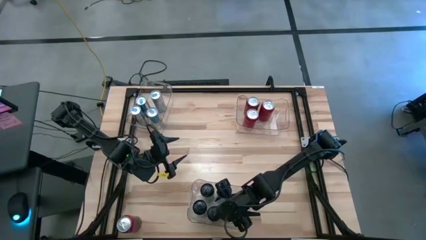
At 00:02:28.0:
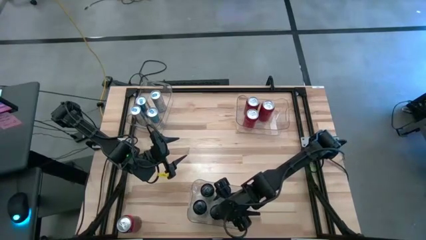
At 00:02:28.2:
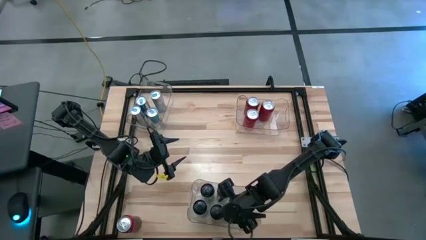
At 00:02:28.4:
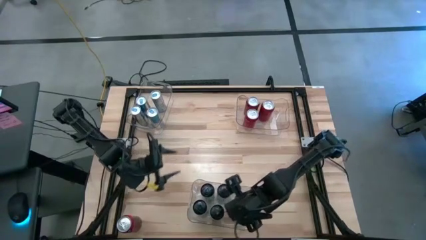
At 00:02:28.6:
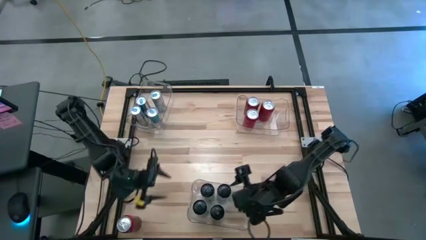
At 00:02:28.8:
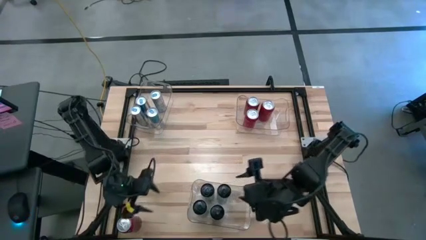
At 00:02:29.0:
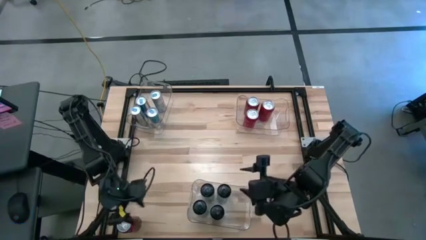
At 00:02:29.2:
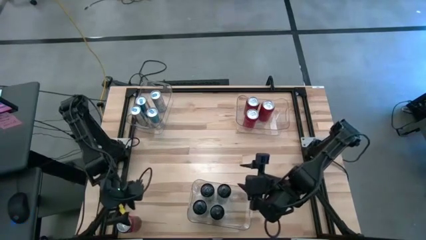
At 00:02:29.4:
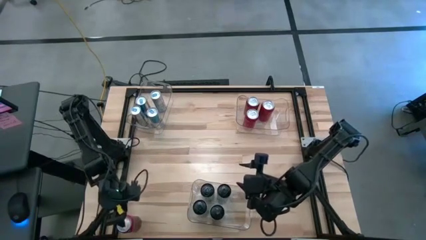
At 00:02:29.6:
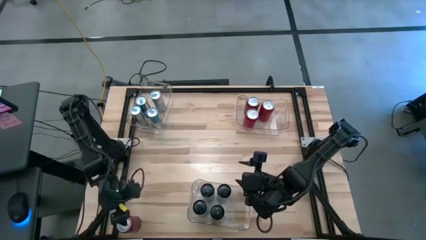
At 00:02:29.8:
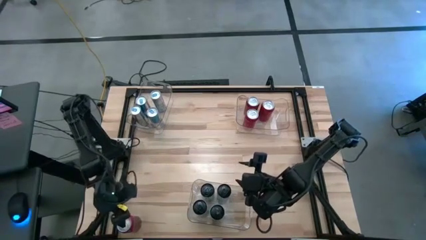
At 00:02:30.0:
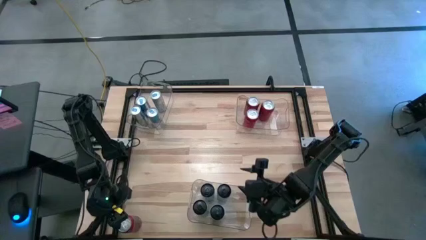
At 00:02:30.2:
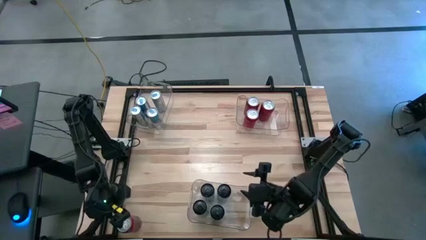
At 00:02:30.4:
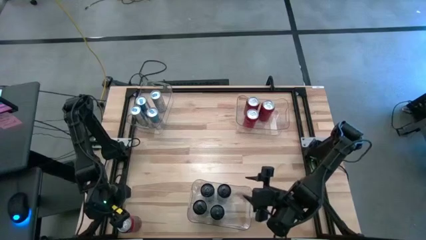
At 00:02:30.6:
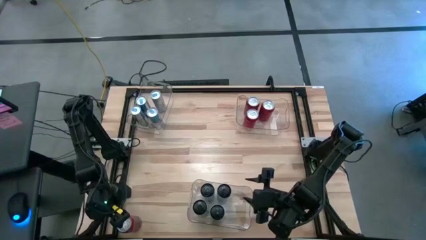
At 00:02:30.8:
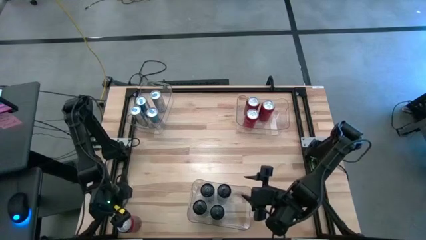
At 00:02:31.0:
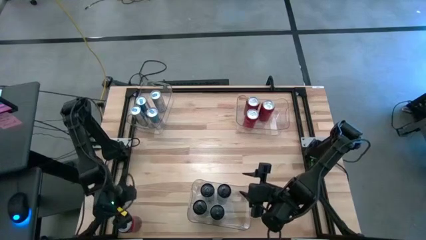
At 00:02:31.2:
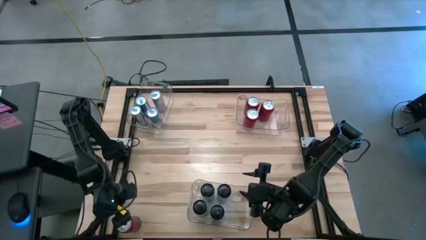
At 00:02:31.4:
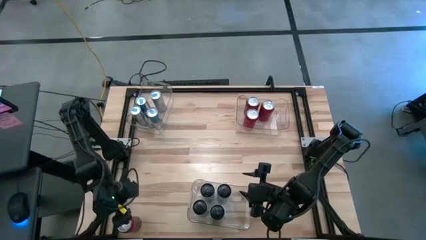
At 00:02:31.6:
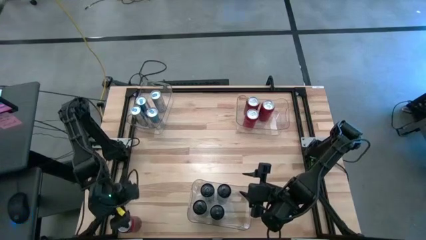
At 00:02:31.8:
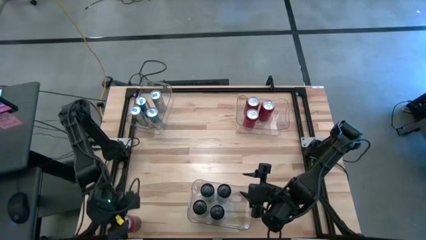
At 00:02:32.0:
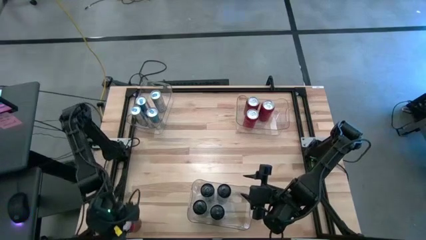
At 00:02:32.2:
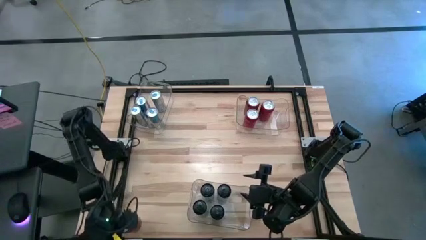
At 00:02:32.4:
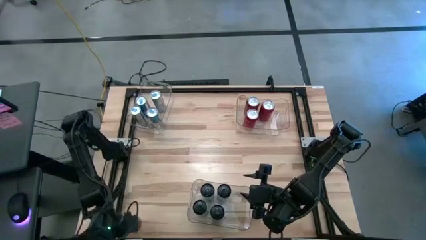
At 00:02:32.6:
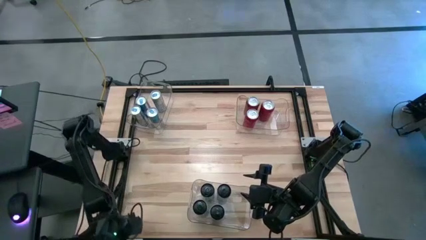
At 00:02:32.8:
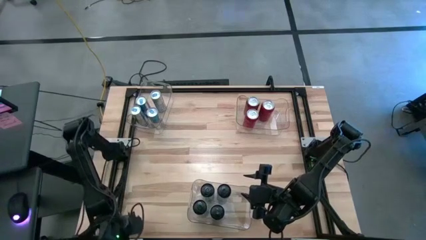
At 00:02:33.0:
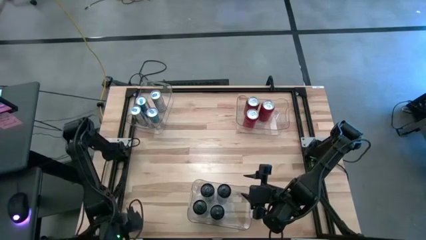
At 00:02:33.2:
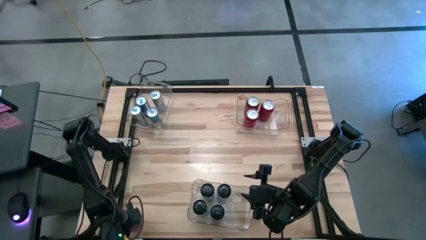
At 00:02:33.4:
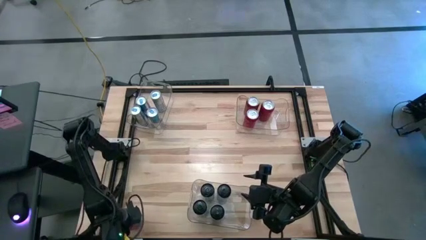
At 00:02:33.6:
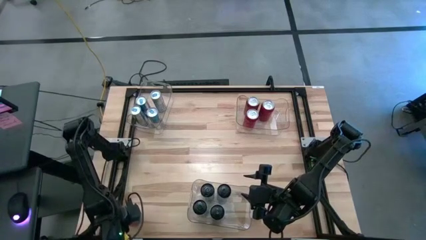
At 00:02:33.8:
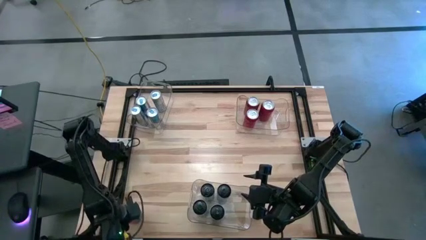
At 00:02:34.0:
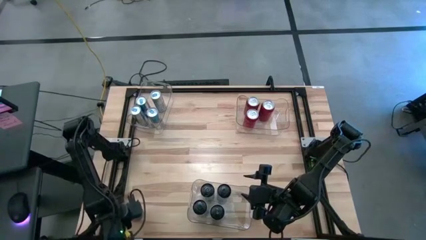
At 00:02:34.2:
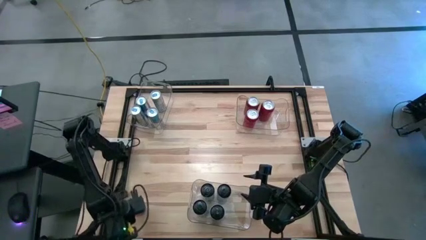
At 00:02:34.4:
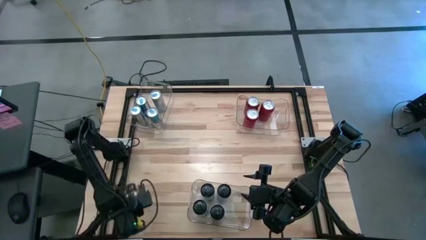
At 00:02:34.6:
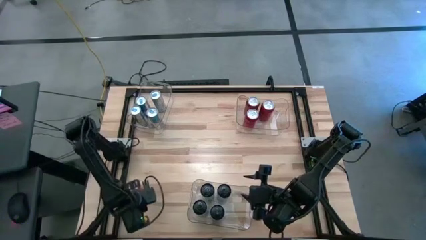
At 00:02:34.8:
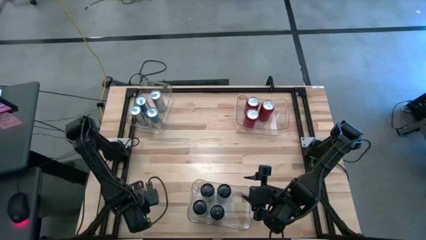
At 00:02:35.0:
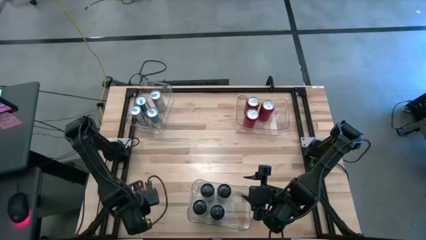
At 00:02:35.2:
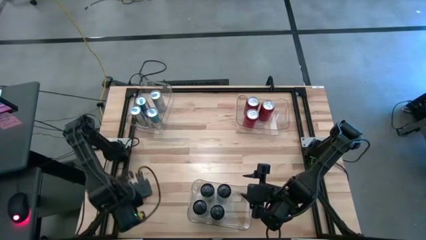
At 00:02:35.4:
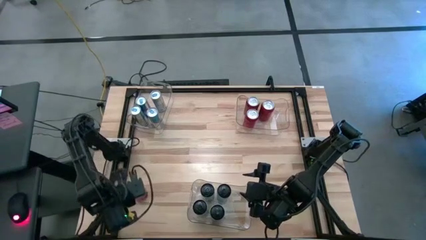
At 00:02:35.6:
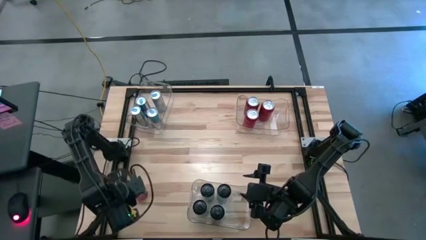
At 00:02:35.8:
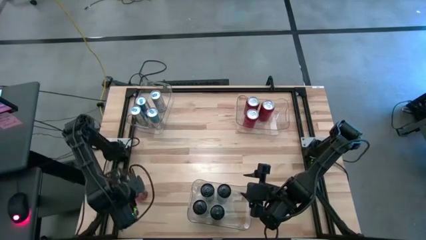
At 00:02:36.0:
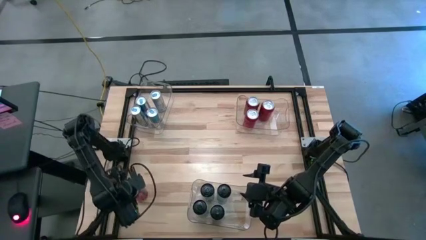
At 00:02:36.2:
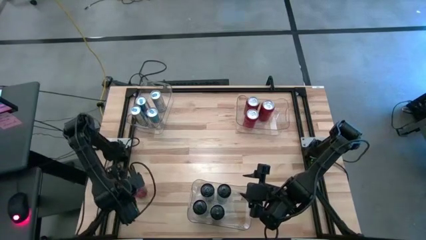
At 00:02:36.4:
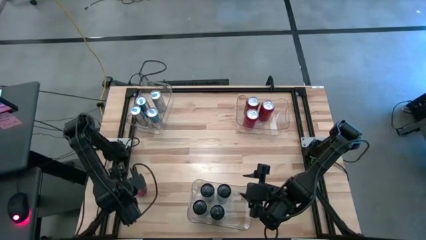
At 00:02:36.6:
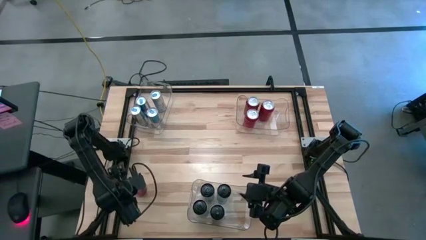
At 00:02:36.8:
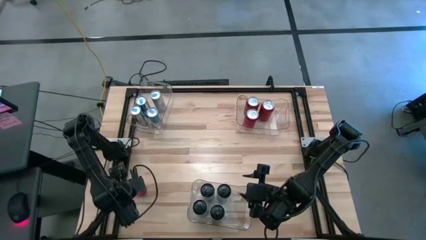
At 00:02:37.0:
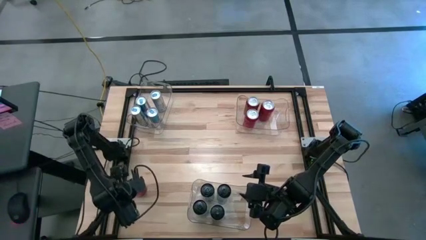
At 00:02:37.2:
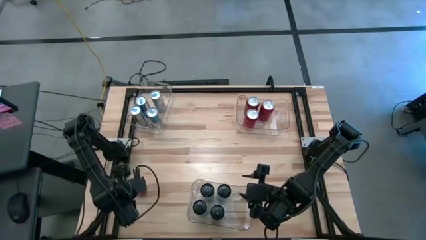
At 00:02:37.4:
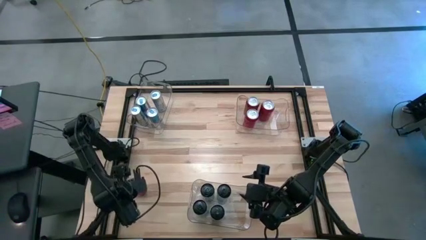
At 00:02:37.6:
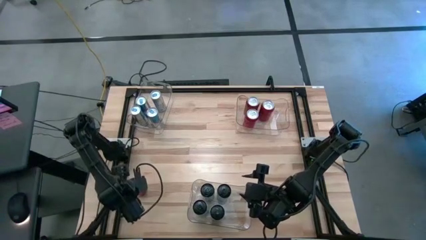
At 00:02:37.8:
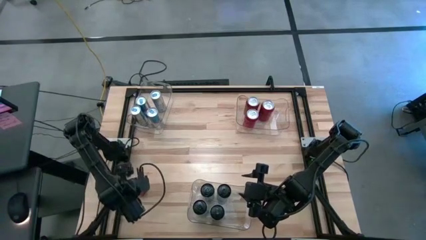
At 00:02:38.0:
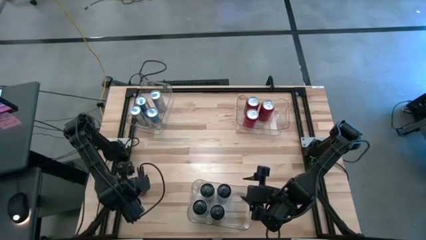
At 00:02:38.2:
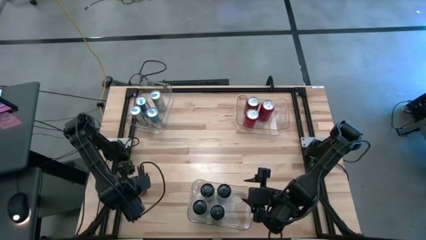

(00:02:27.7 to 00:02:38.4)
Task: Sort soda cans
Put the red soda can into the top right transparent bin
